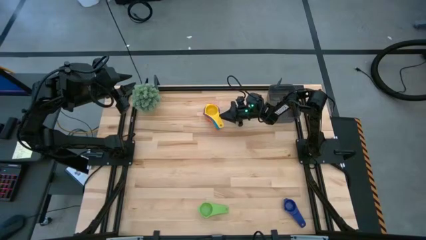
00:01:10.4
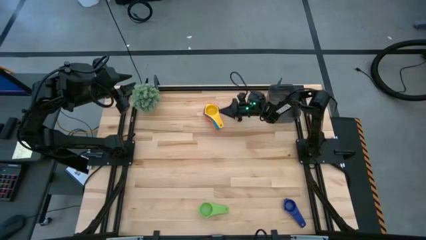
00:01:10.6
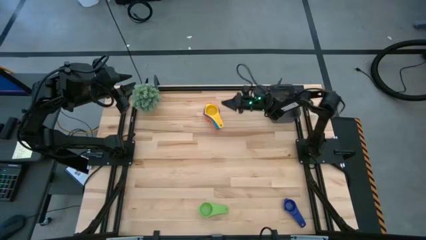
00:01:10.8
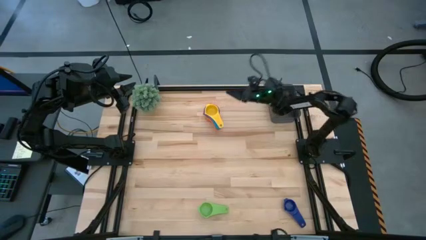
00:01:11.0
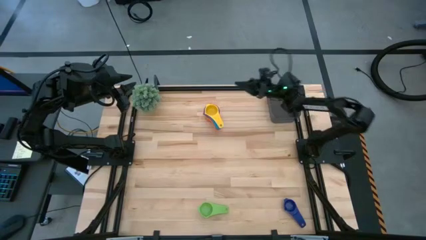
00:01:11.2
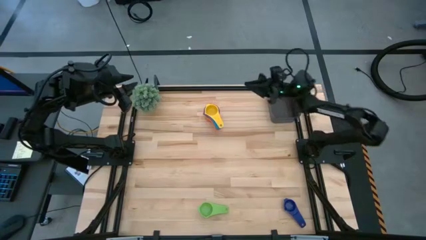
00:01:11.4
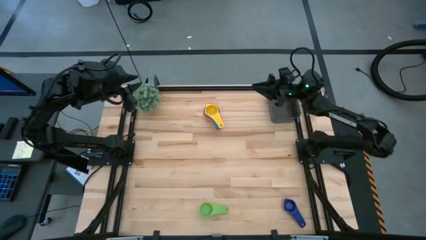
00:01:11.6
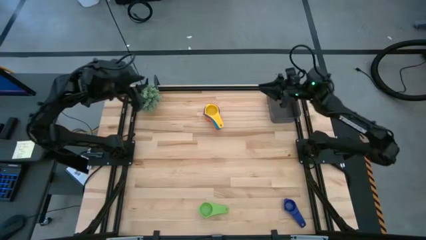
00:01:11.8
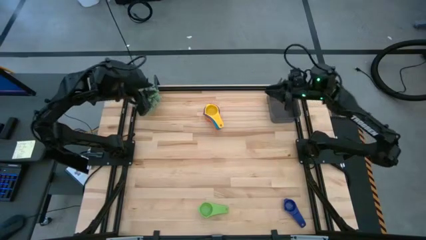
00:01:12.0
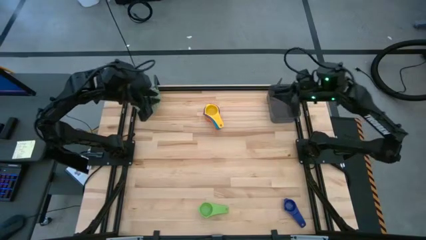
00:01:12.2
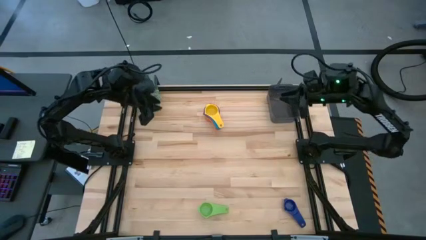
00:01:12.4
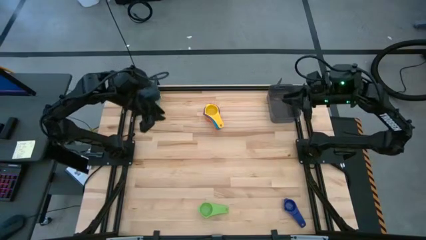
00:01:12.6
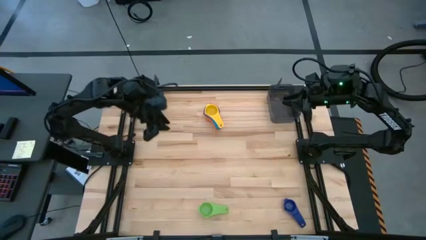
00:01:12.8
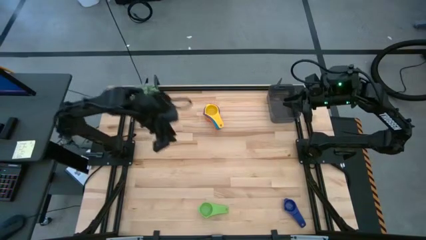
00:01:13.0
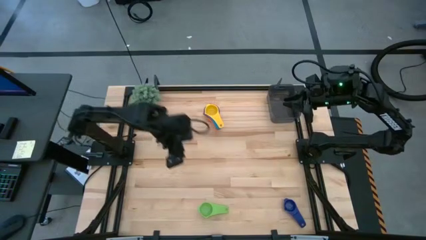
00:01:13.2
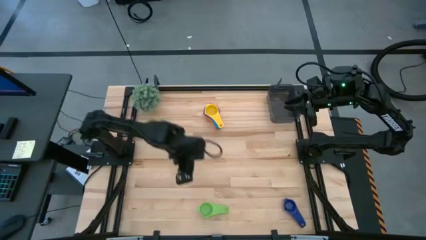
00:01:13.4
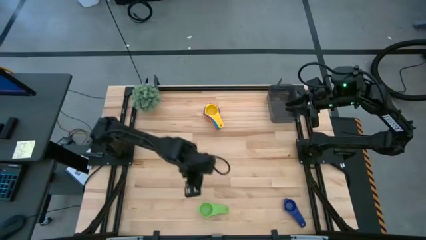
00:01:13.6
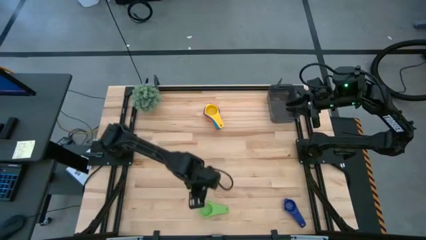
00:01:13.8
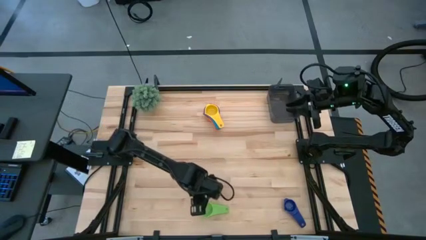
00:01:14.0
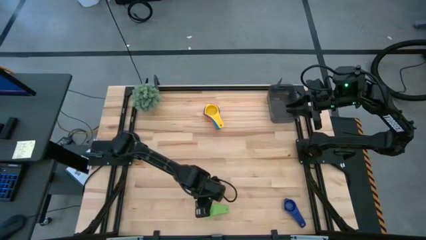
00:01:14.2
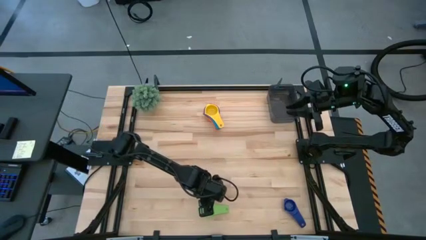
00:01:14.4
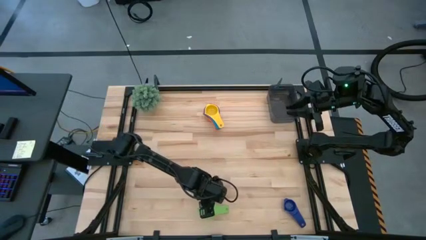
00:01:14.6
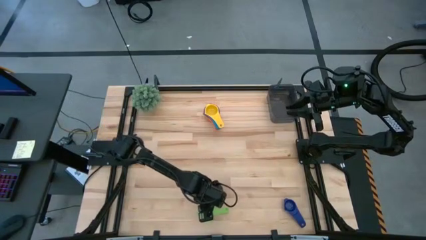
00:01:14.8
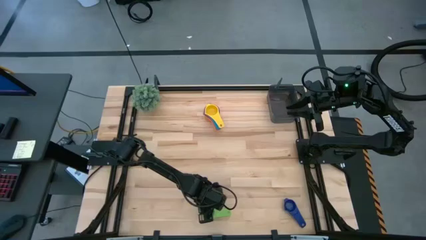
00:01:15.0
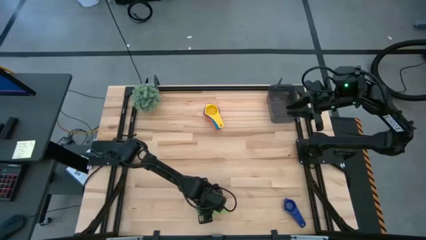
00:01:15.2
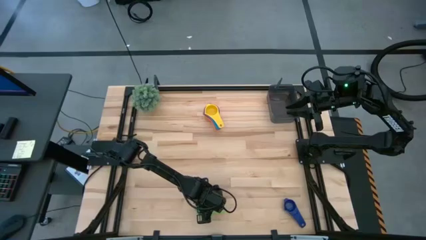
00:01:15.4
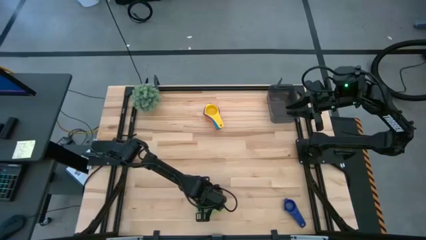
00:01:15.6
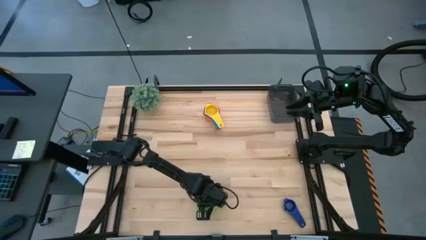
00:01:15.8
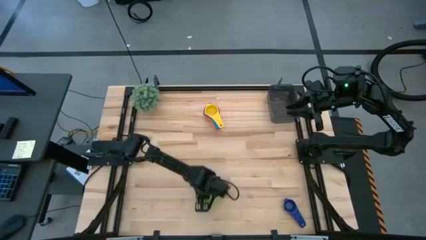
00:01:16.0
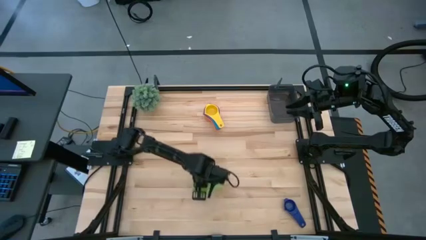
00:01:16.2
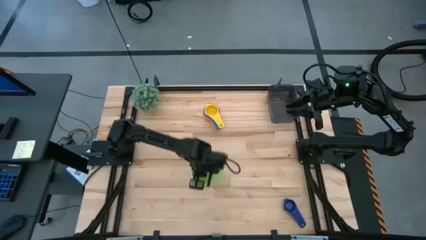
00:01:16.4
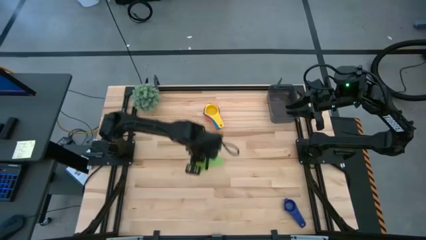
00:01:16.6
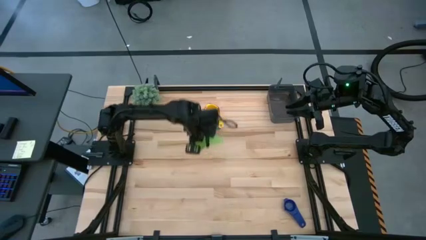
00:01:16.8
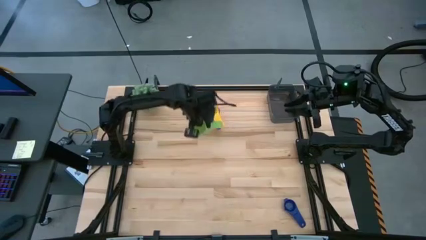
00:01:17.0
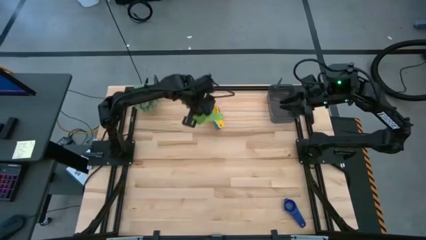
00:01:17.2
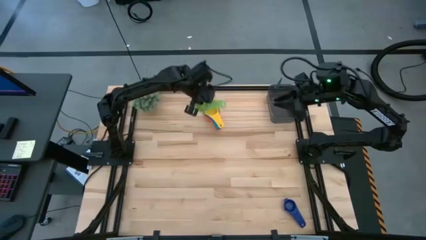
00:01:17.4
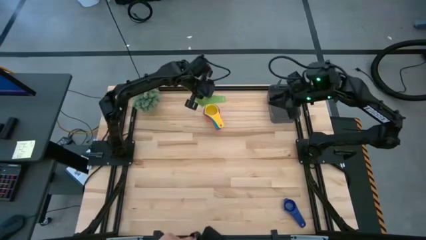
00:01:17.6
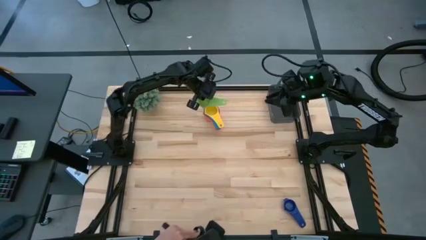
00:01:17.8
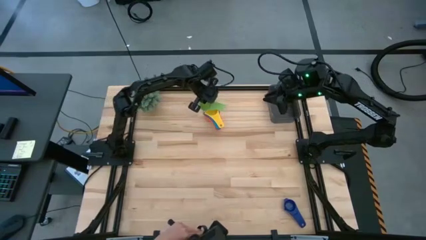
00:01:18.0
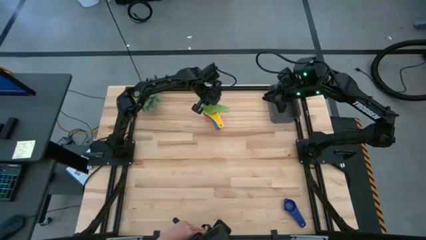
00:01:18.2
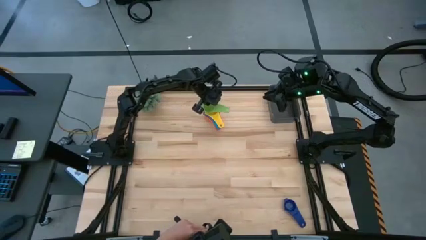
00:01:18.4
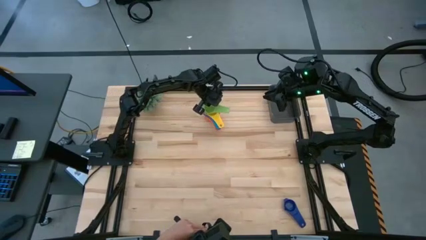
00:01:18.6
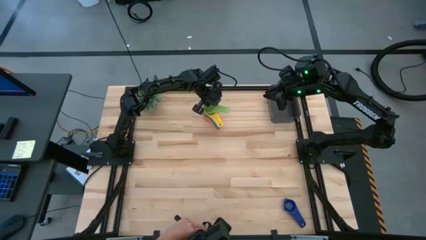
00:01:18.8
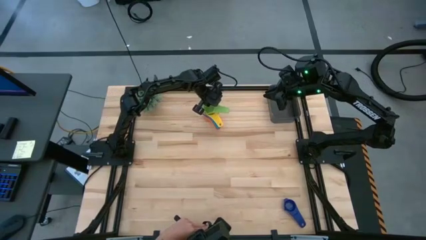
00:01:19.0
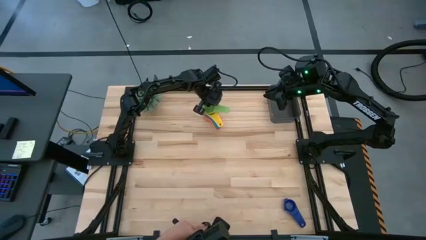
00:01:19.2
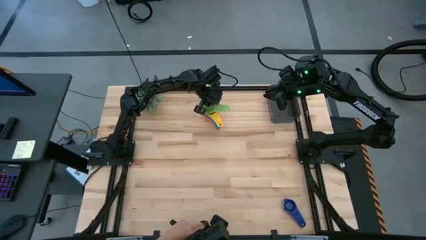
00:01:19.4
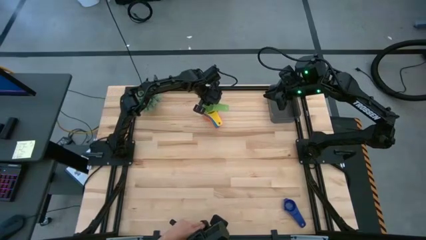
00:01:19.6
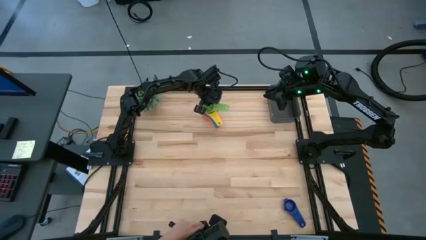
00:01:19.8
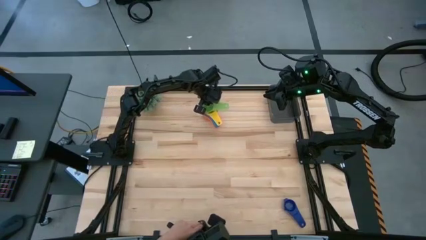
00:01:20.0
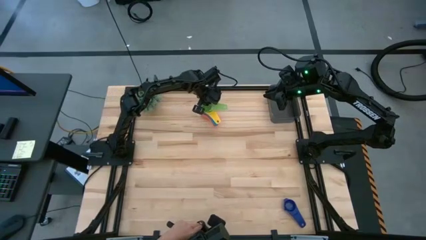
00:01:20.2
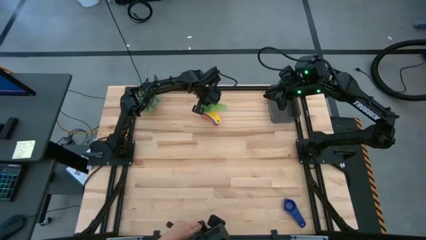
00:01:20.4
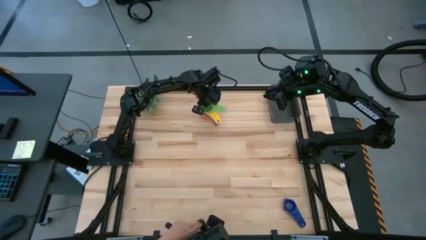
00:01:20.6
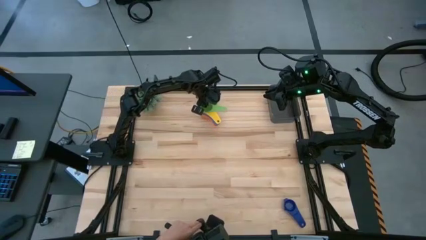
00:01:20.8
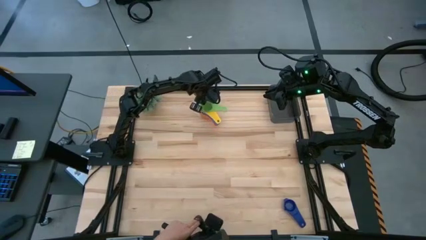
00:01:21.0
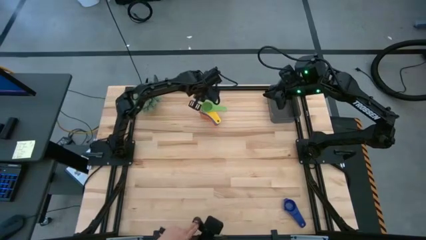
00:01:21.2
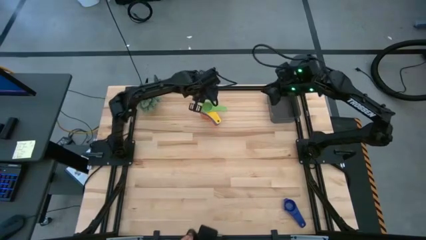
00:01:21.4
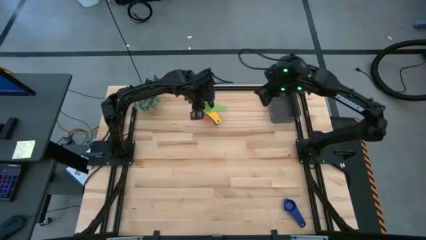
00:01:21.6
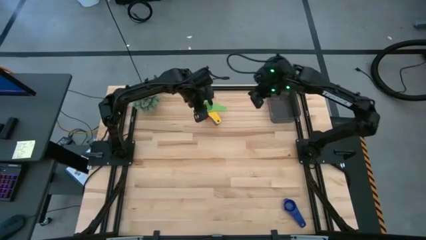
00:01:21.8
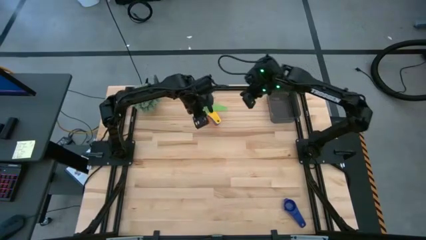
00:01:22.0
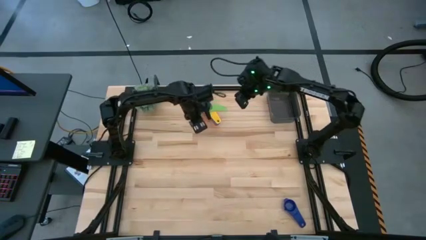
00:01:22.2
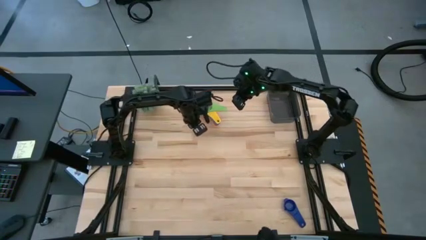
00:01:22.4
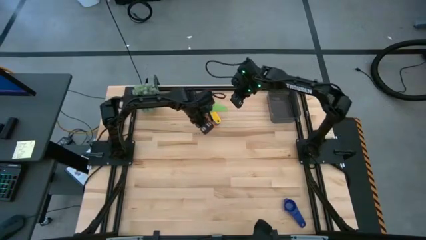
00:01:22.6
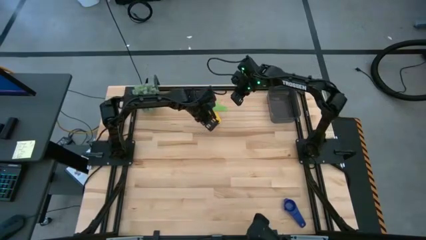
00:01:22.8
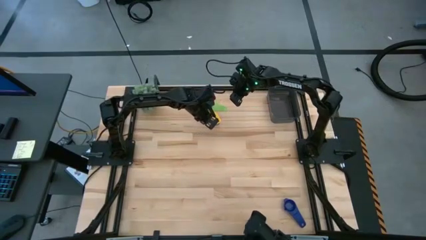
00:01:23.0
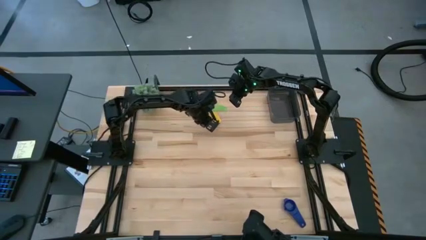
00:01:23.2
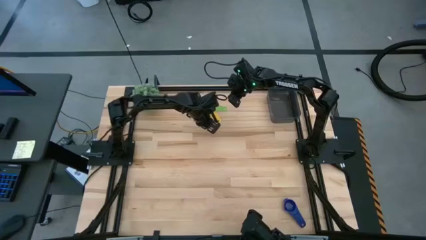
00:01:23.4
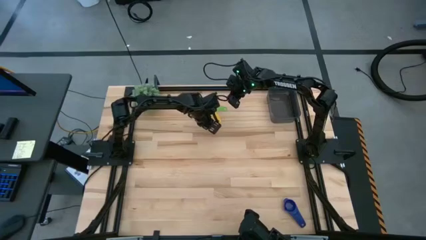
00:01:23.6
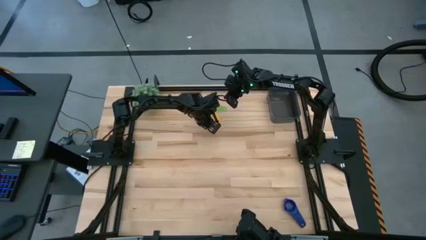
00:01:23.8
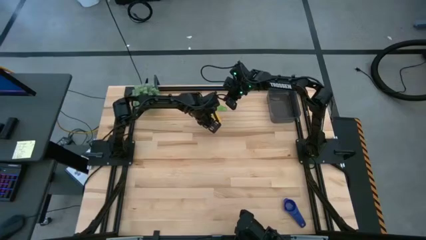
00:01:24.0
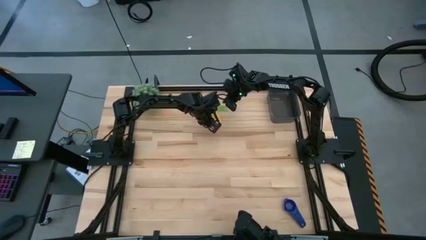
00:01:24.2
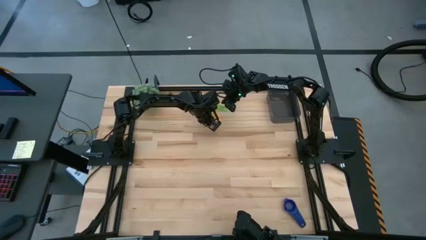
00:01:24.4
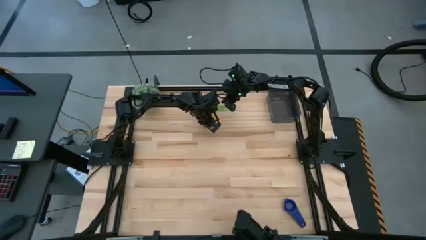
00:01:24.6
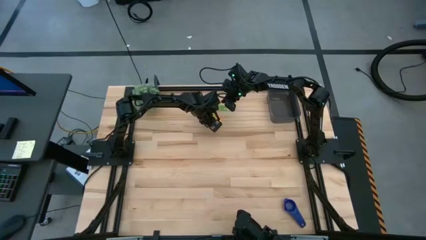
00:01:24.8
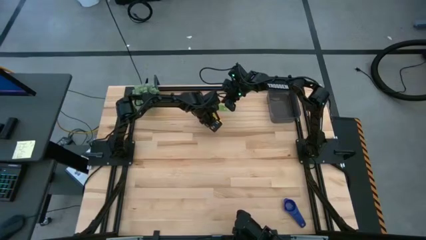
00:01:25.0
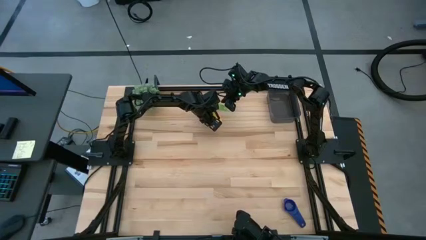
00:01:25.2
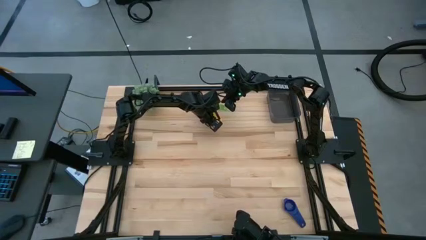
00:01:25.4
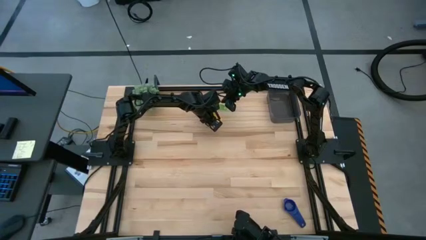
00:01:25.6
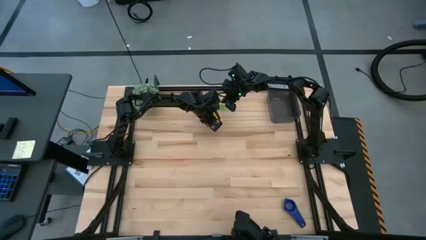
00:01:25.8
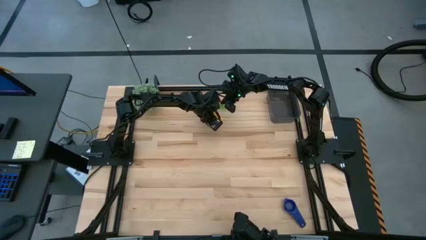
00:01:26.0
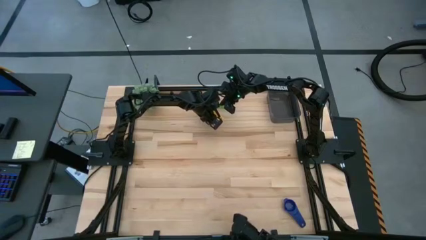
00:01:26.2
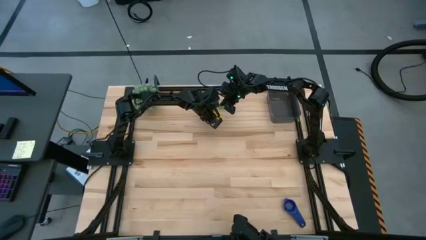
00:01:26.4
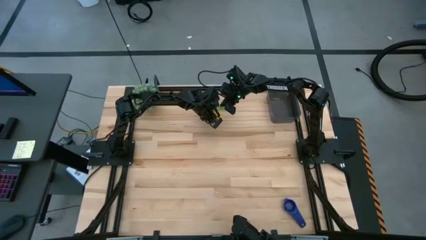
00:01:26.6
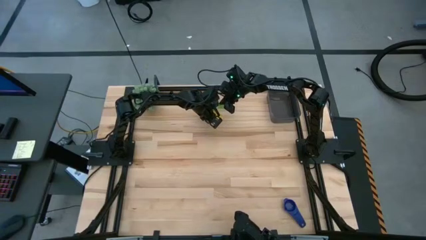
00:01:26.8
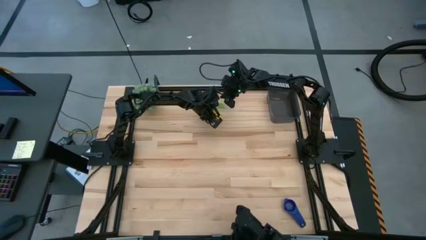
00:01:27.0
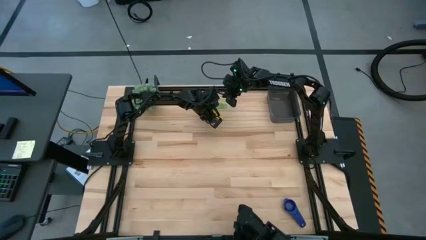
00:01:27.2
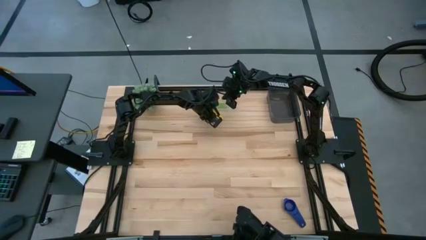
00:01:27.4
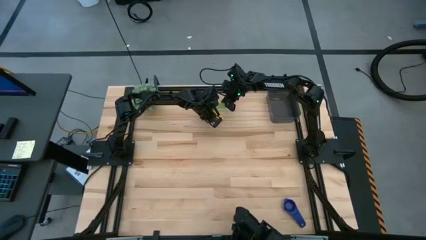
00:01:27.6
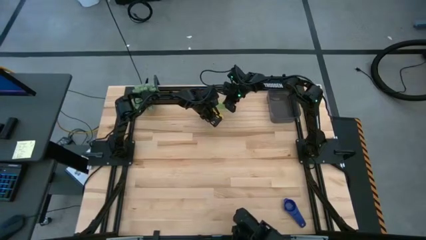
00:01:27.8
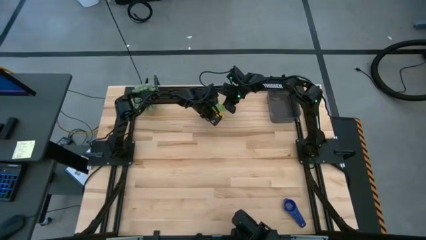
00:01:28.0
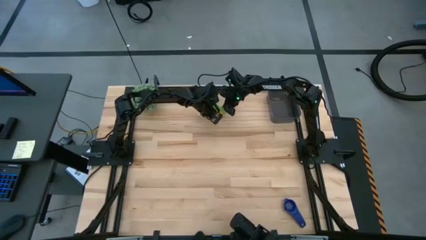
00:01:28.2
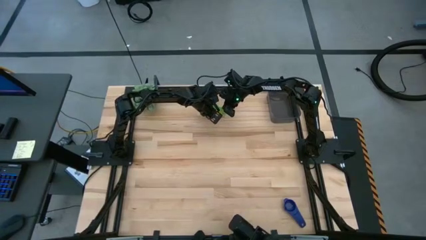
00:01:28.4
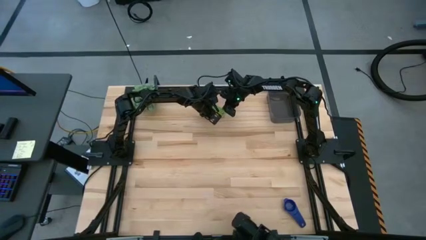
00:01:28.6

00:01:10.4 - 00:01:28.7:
Task: Nest measuring cups in basket
Stack the green measuring cup on top of the yellow measuring cup
